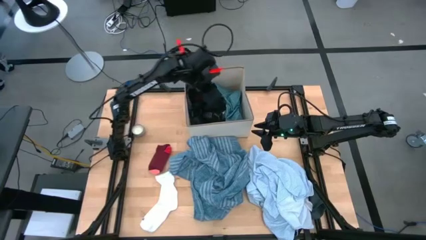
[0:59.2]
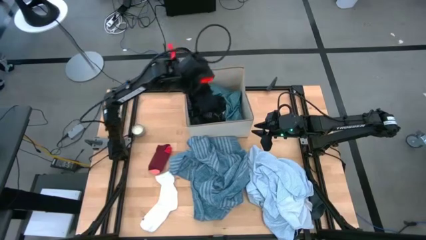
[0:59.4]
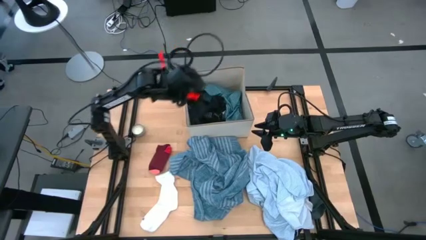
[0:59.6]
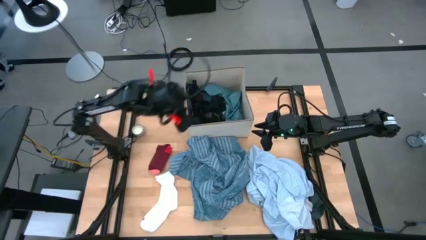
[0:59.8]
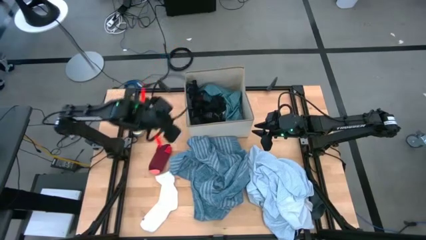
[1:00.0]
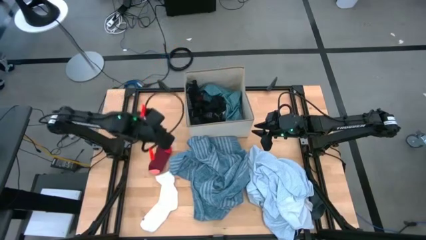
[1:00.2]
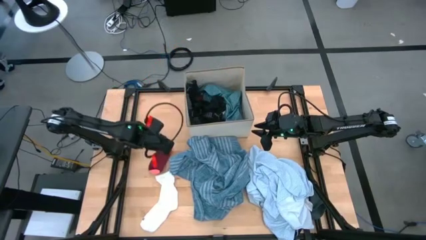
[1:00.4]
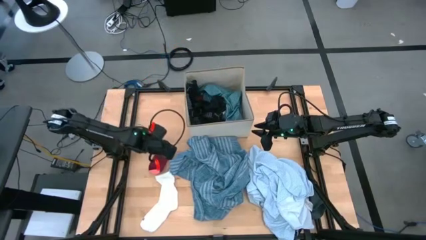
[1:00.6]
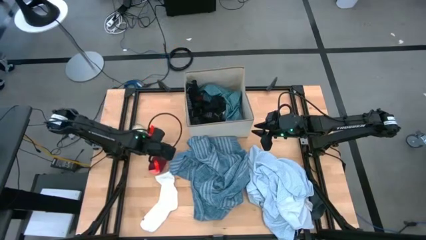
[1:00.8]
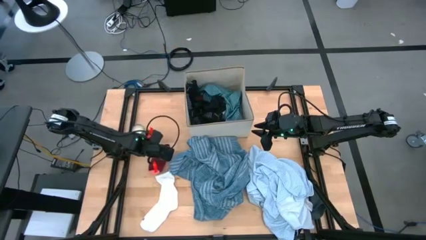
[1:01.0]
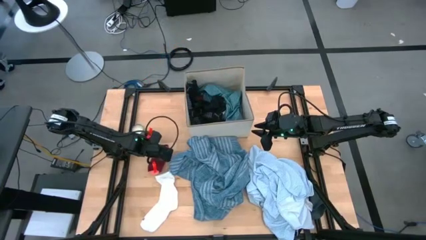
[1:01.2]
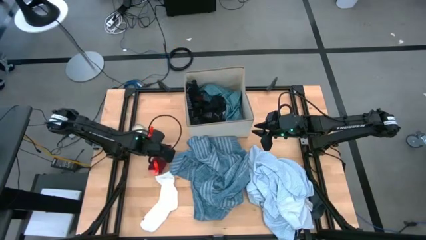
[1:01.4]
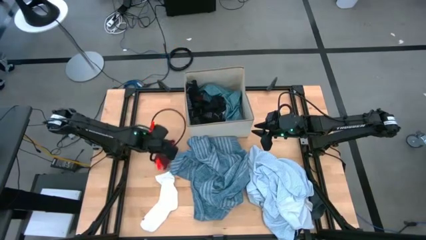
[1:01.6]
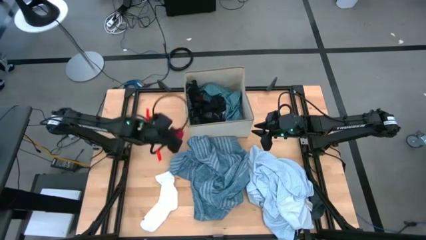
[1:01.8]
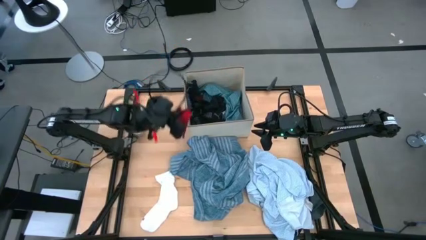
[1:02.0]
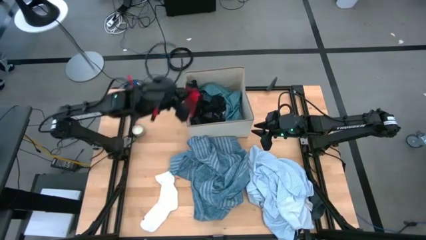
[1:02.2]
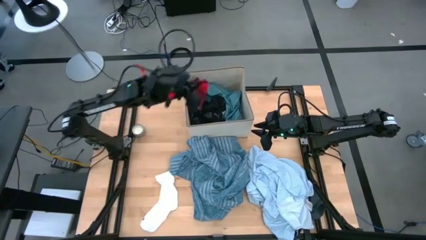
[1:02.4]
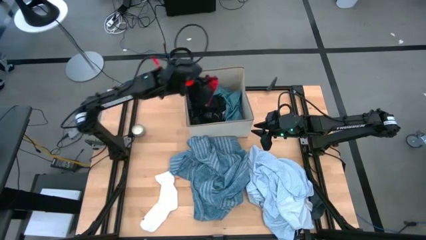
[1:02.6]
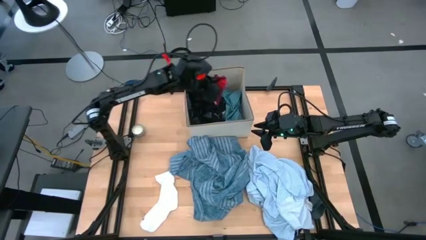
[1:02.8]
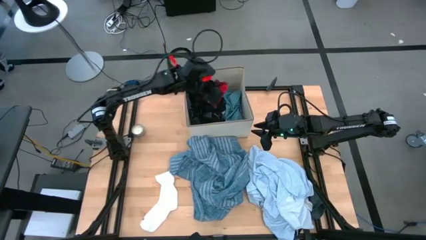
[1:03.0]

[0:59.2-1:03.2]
Task: Sort clothes
Put the red sock into the laundry bin

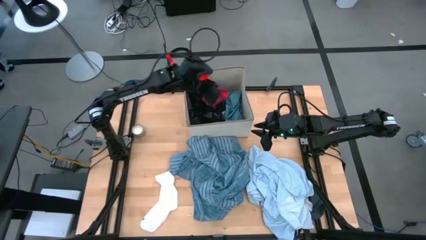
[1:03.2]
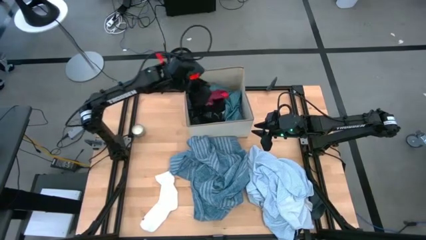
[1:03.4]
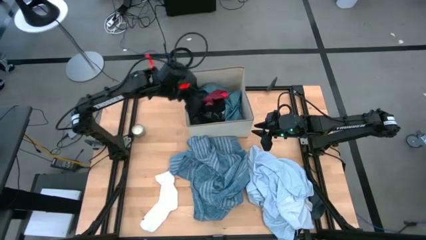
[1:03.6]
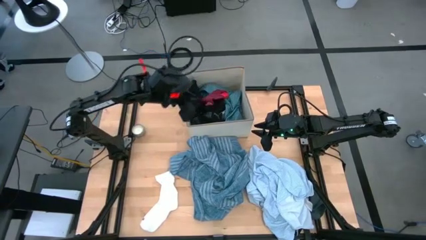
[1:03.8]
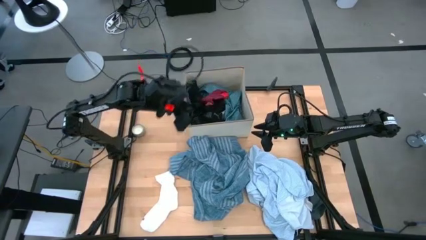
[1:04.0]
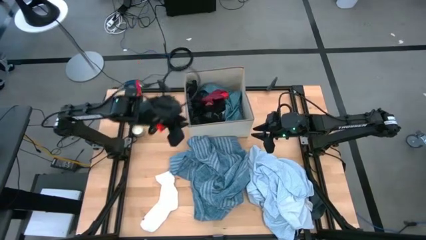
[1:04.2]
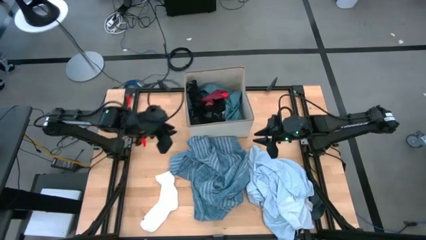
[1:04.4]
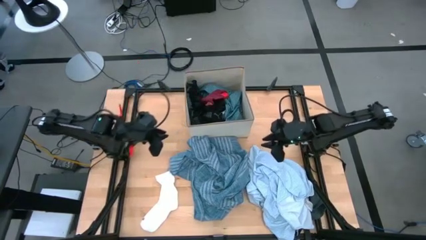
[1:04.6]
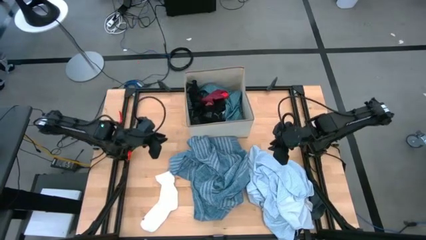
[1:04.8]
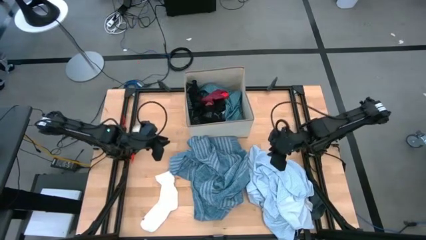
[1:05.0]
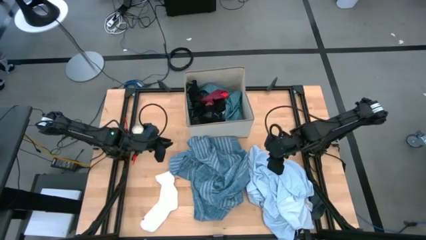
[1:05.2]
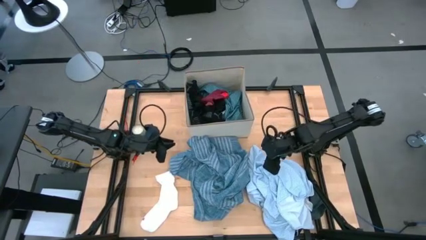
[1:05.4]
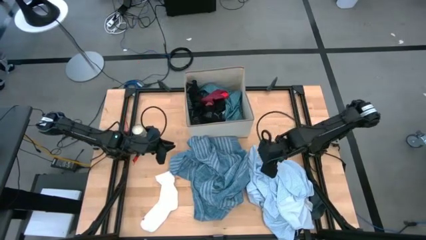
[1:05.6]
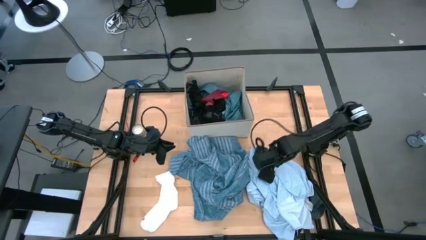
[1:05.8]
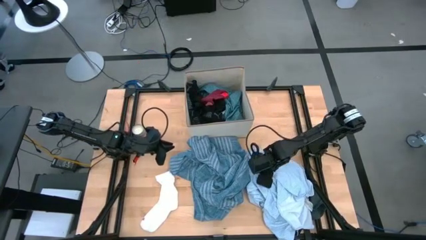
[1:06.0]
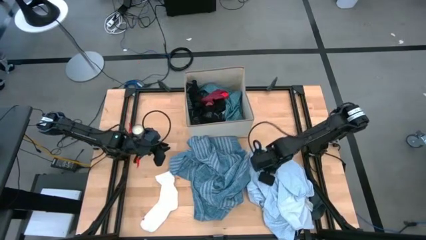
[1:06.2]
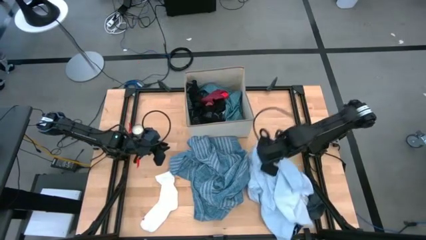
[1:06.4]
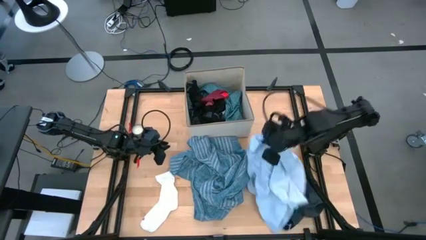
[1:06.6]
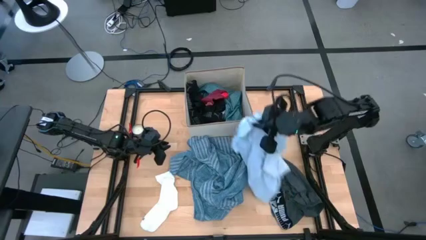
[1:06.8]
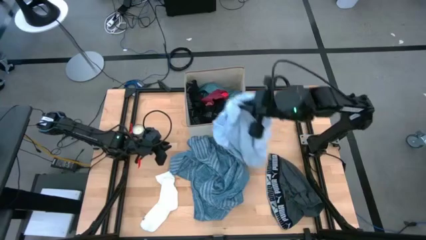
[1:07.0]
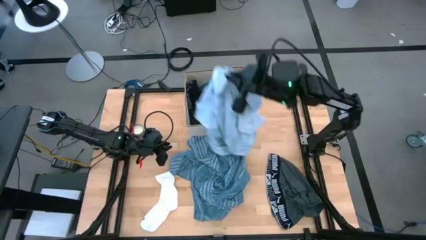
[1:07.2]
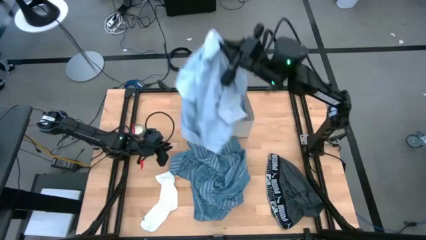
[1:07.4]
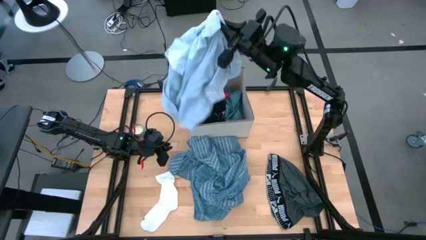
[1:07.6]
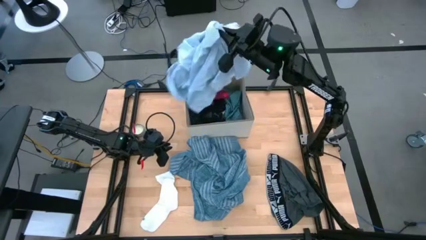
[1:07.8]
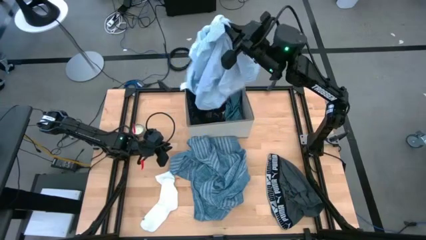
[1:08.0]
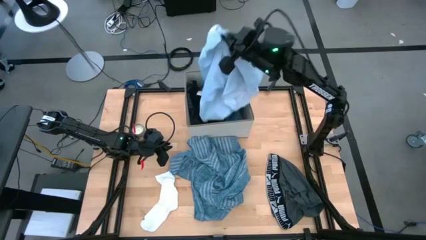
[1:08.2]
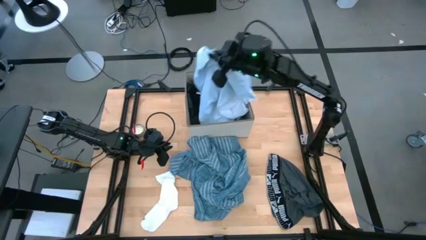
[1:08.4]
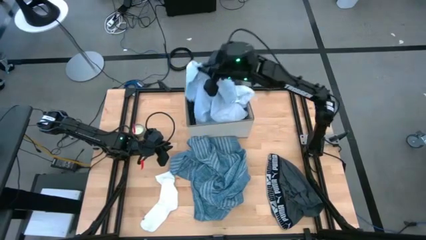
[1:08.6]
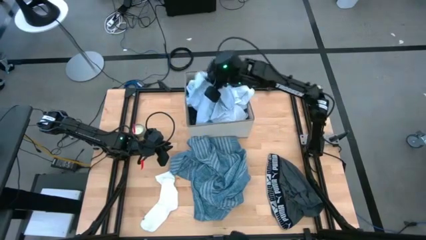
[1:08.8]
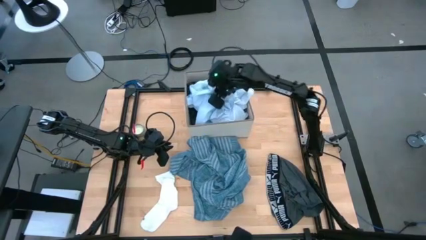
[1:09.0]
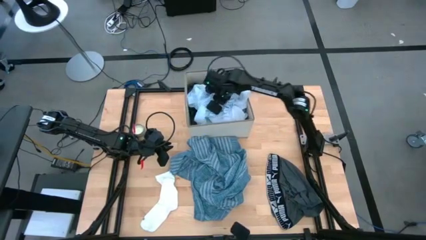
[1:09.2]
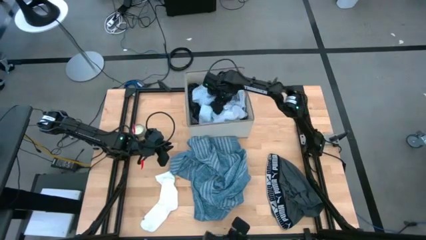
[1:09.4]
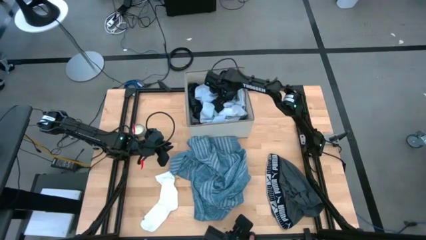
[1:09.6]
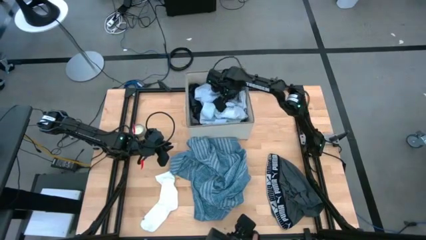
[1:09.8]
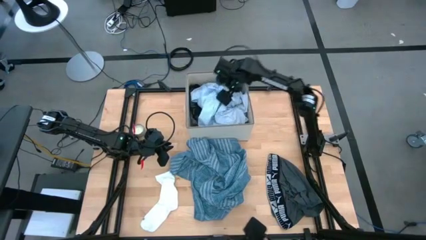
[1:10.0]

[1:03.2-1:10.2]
Put the light blue polo shirt into the laundry bin

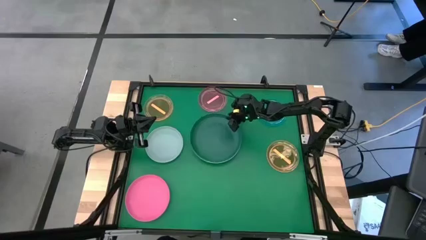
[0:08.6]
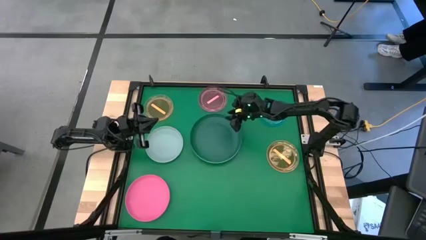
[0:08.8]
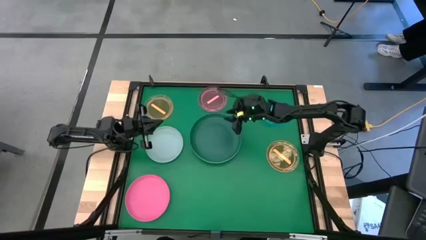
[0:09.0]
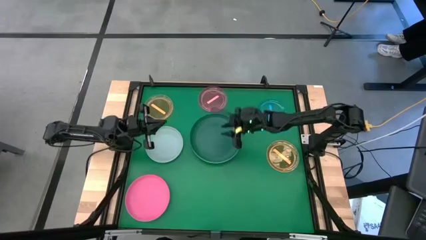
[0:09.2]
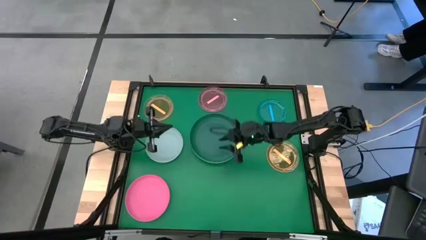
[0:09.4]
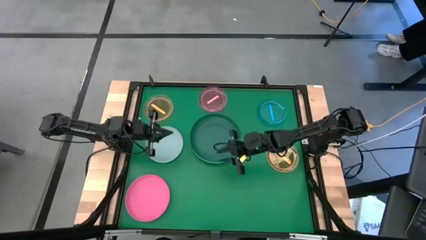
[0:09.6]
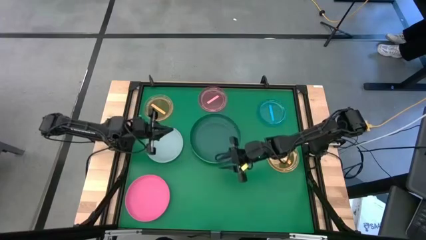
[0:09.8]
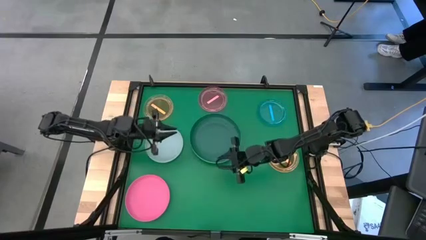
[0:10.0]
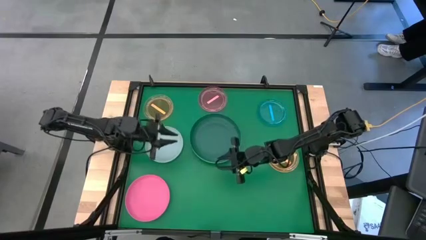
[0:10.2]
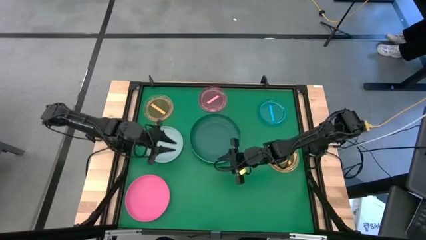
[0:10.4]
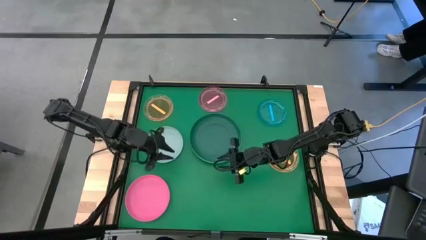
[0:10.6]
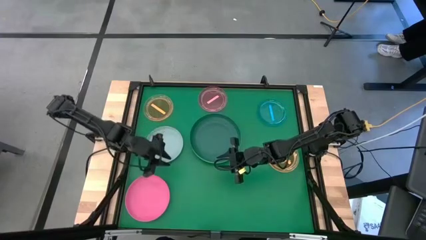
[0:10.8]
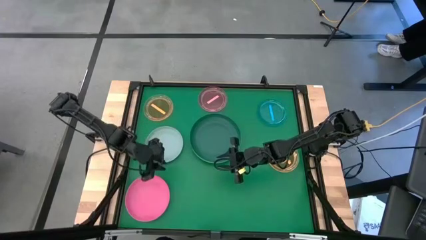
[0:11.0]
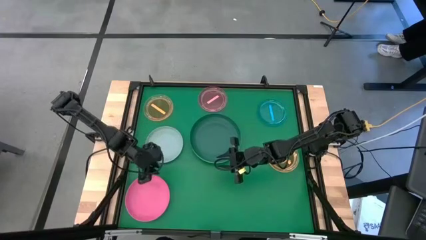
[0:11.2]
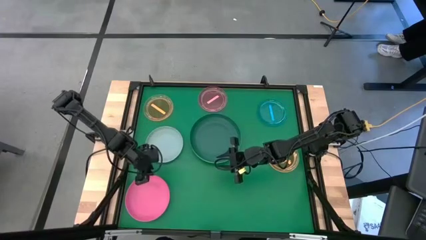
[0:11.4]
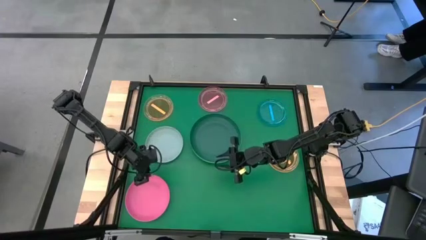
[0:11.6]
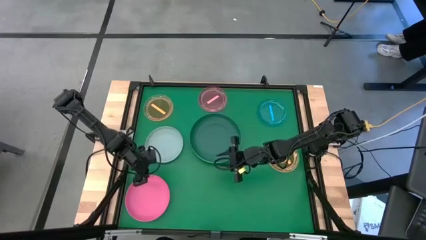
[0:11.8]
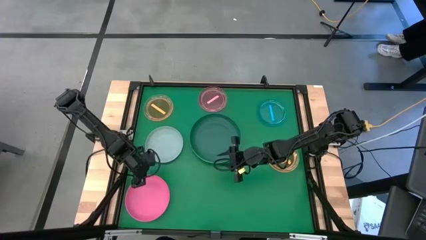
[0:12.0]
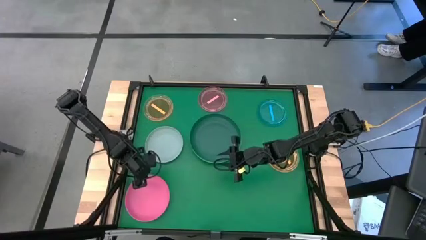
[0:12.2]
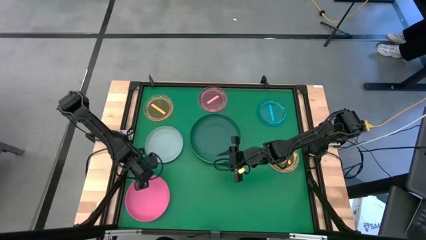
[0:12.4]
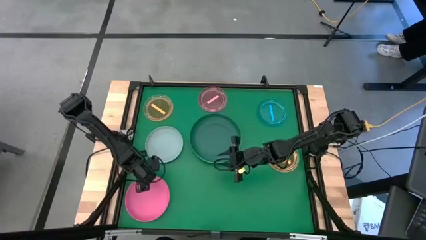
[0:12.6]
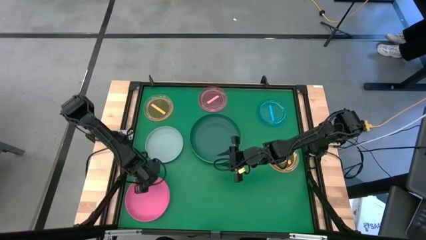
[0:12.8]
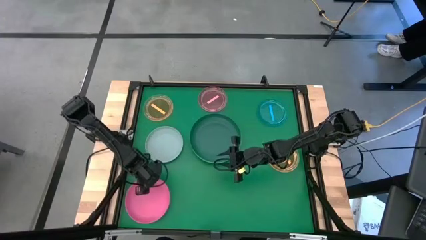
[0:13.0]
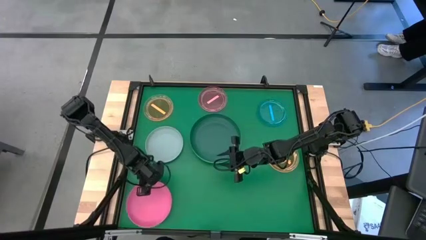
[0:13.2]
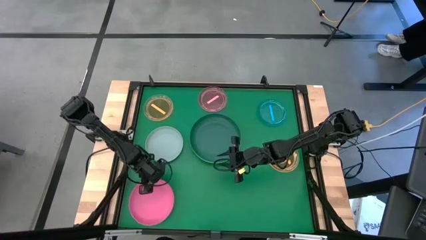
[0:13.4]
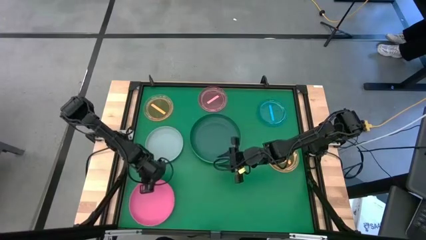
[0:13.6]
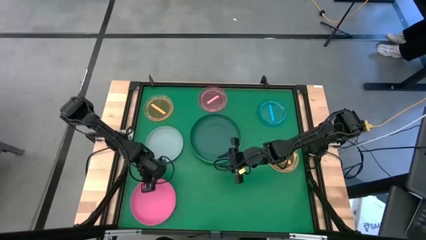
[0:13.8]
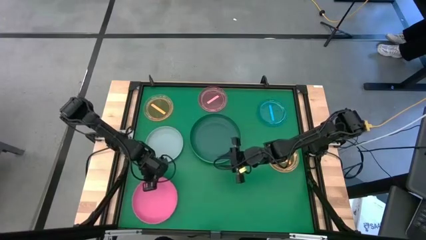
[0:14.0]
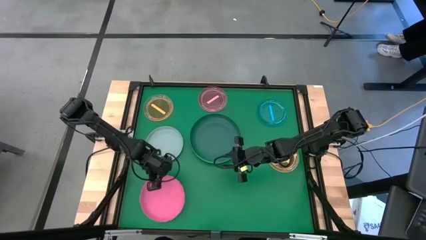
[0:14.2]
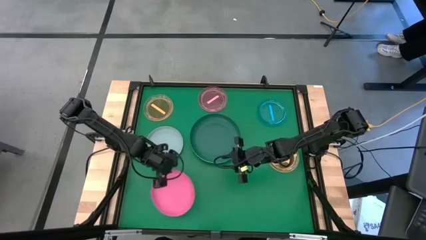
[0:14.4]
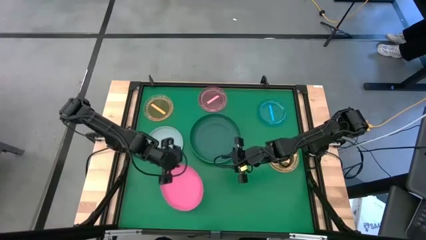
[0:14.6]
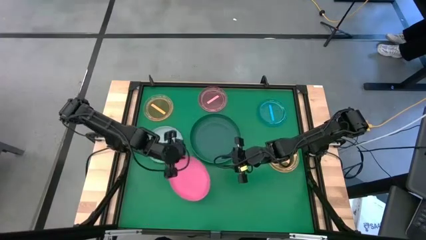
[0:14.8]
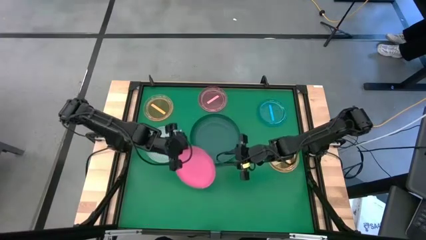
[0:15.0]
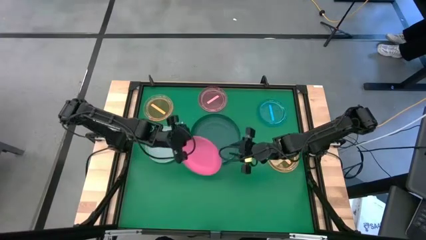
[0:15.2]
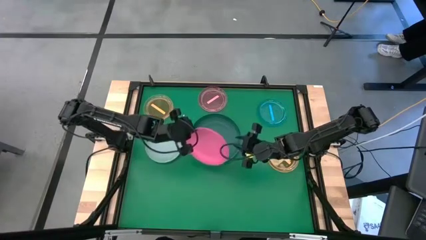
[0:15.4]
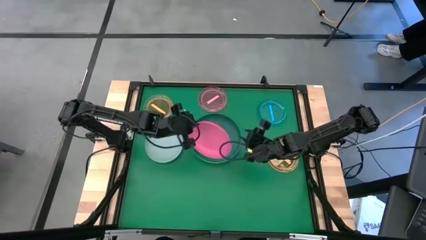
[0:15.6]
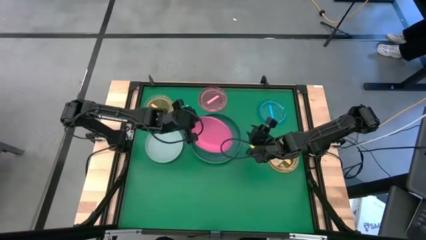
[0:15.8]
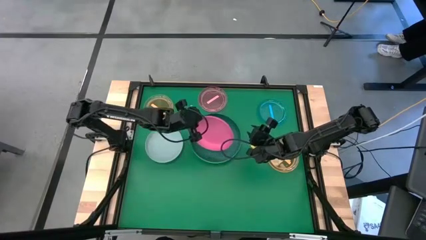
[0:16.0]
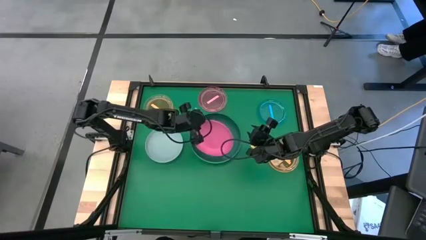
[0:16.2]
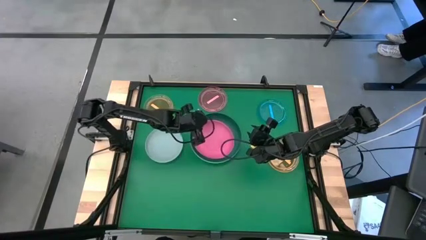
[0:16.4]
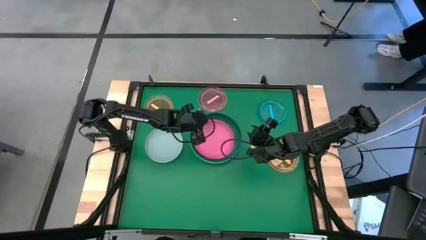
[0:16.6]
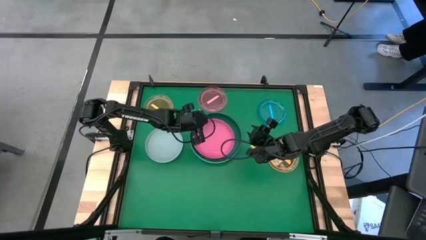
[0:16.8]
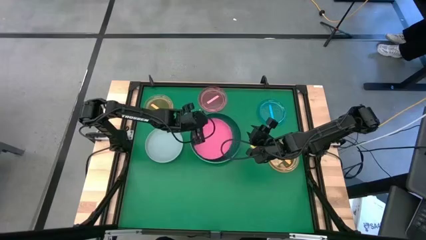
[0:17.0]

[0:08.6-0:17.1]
Task: Stack plastic plates
Stack the pink plate on the dark green plate
